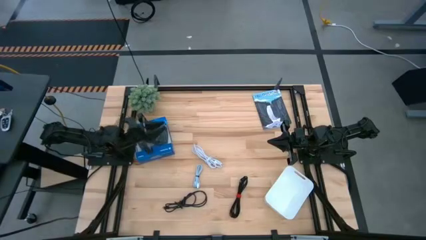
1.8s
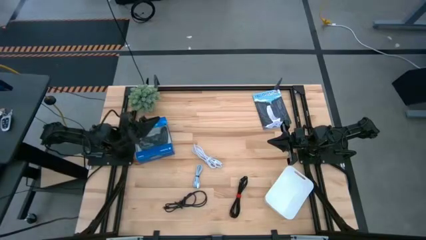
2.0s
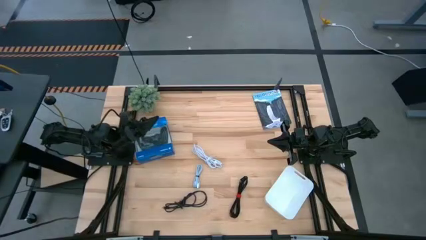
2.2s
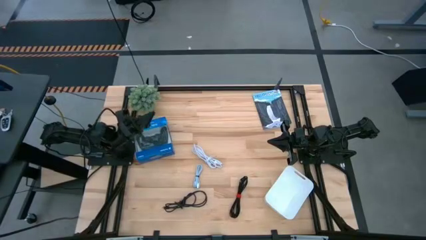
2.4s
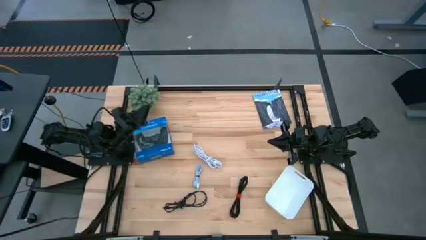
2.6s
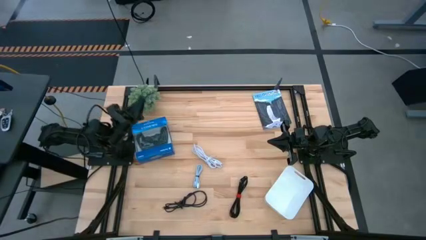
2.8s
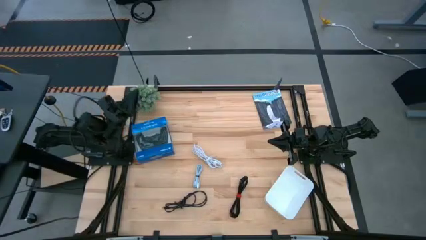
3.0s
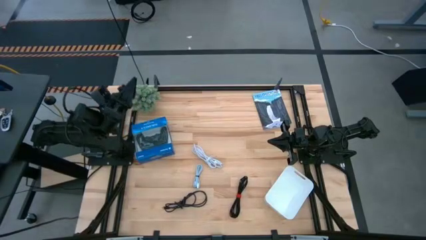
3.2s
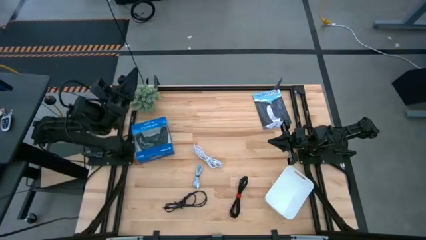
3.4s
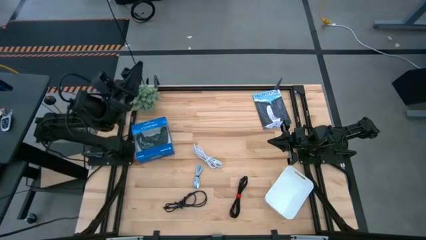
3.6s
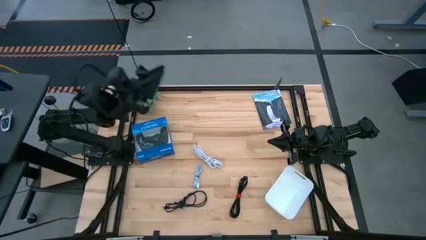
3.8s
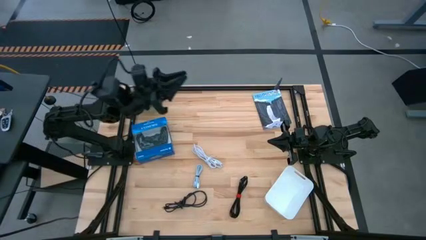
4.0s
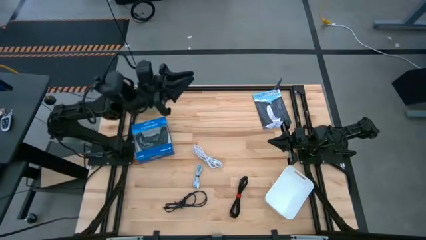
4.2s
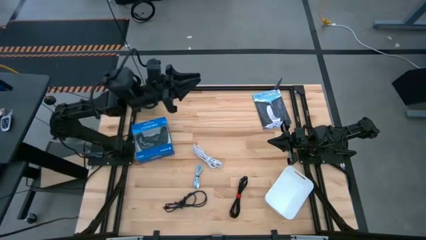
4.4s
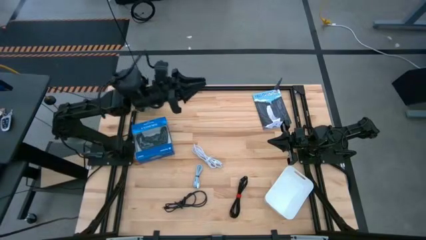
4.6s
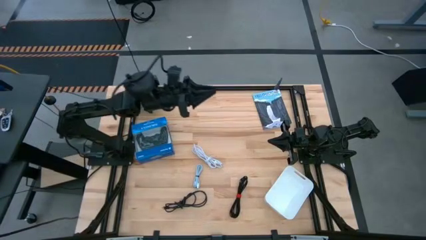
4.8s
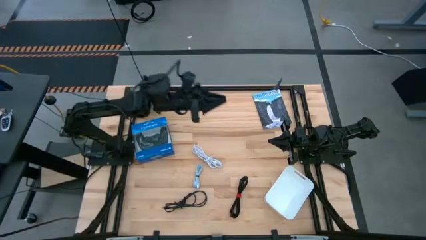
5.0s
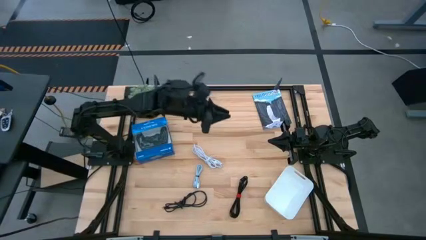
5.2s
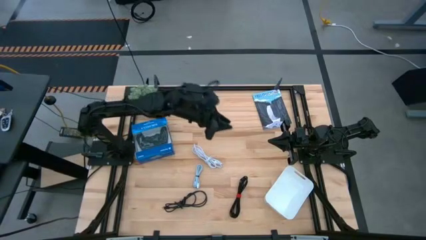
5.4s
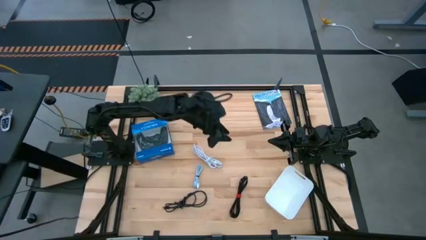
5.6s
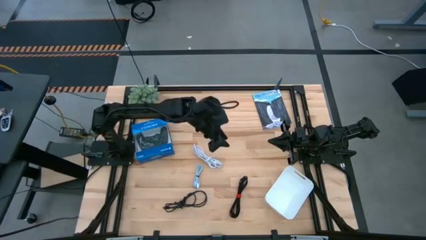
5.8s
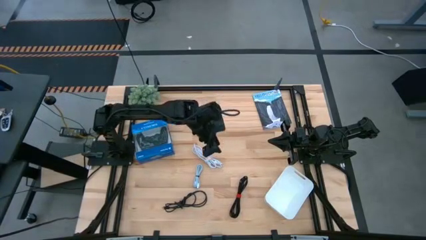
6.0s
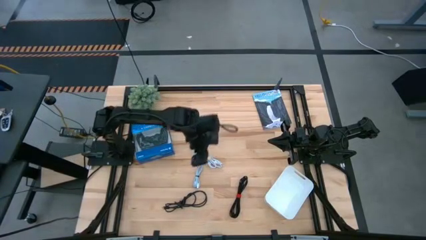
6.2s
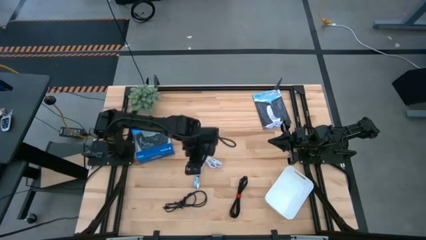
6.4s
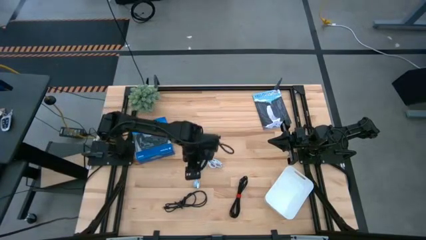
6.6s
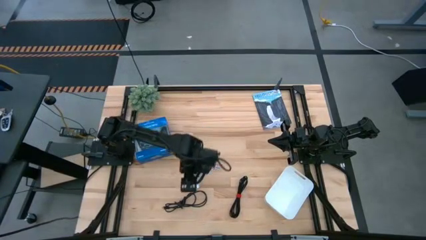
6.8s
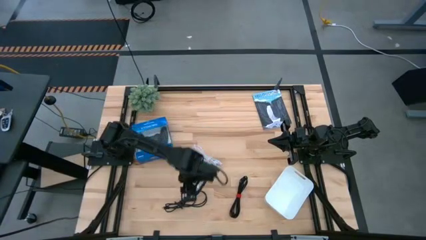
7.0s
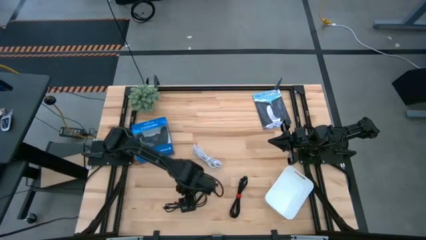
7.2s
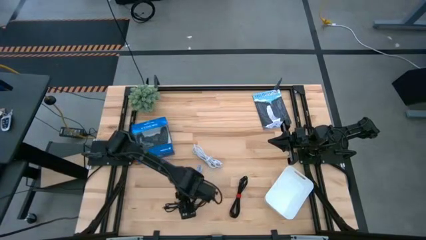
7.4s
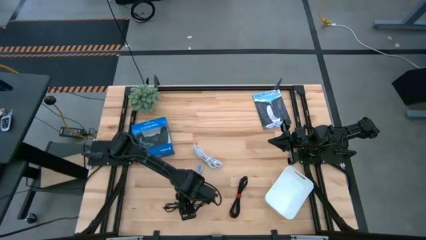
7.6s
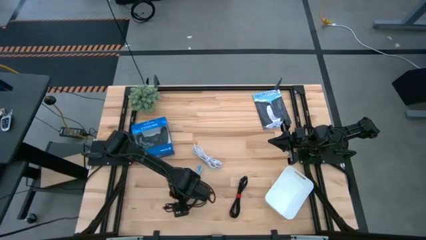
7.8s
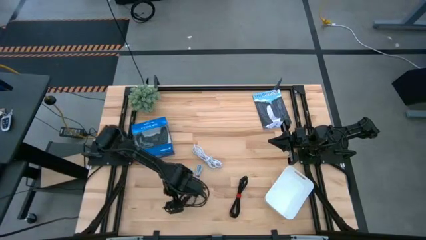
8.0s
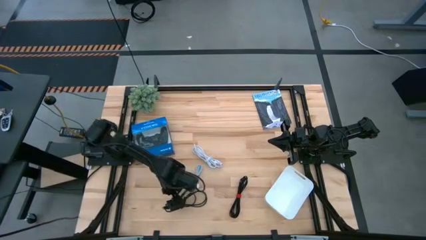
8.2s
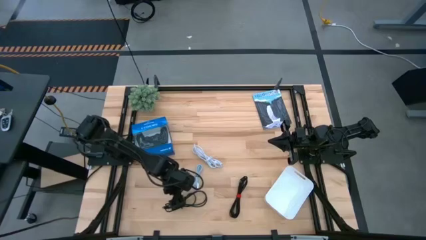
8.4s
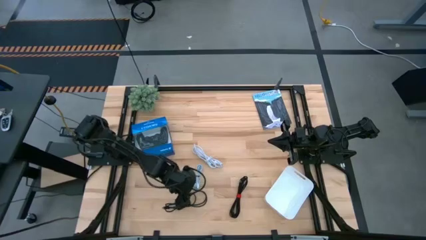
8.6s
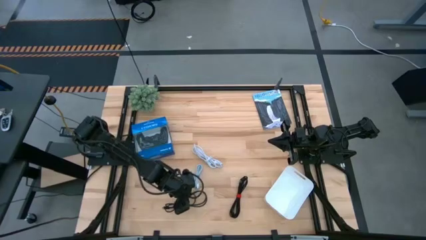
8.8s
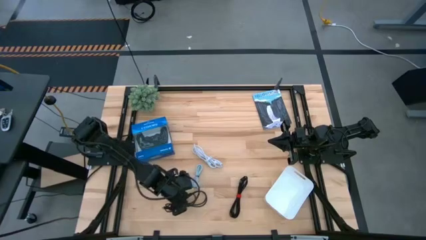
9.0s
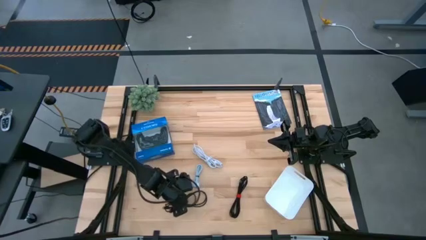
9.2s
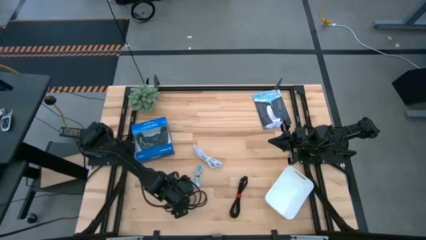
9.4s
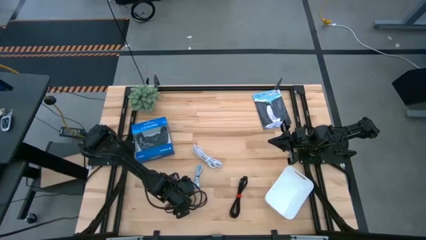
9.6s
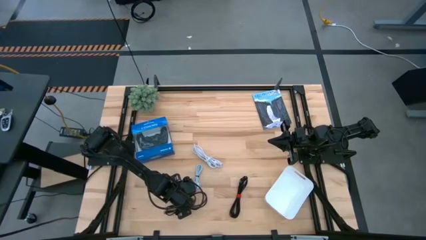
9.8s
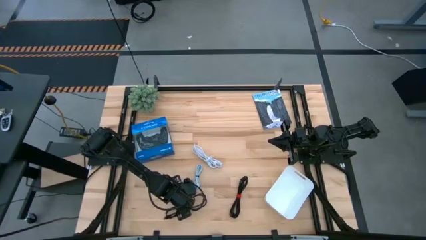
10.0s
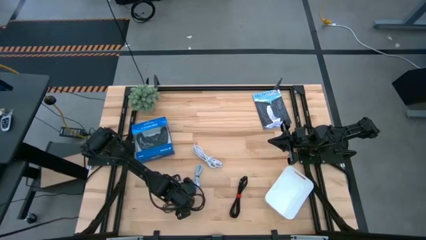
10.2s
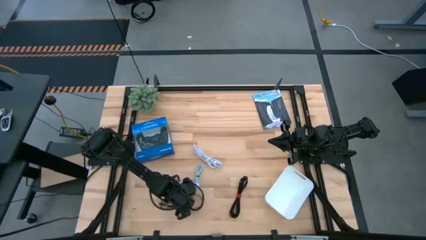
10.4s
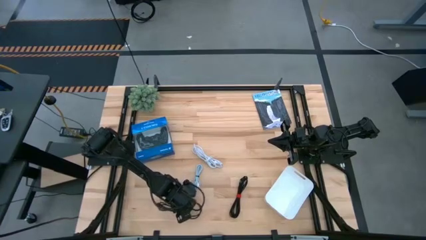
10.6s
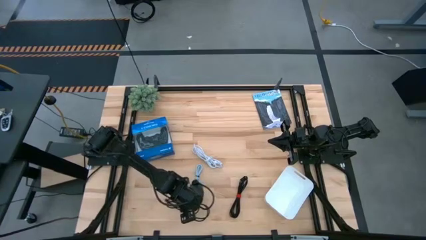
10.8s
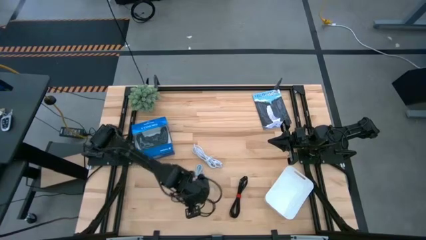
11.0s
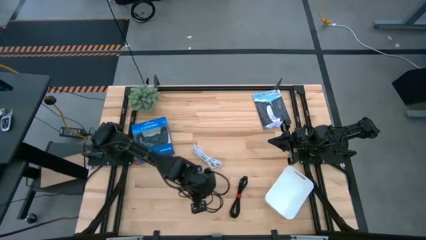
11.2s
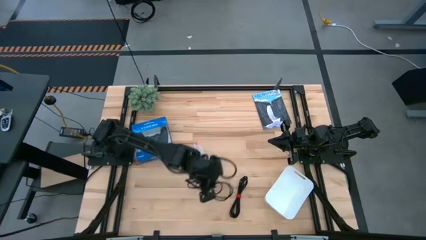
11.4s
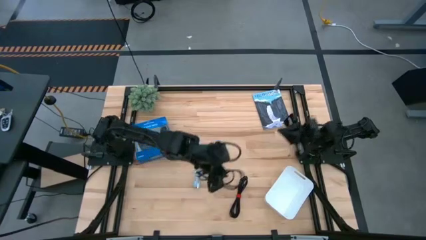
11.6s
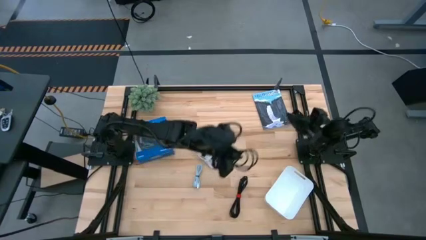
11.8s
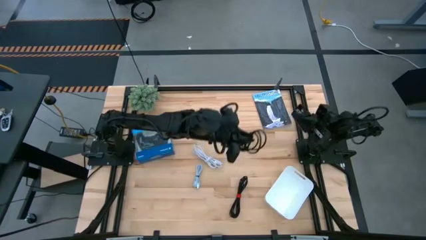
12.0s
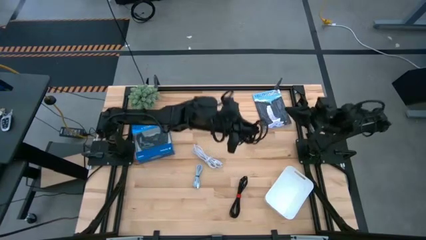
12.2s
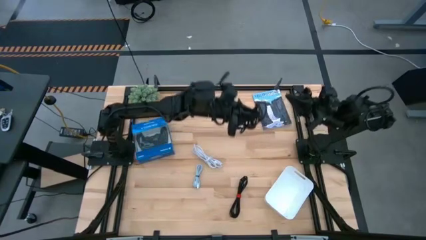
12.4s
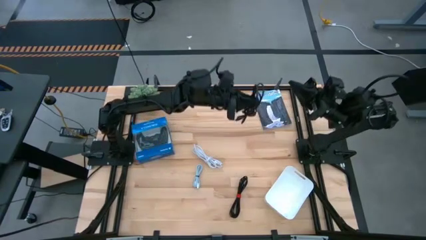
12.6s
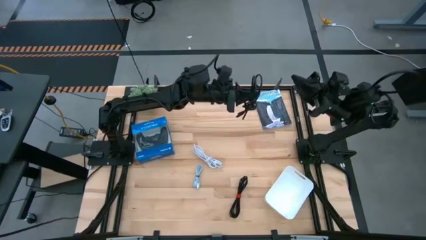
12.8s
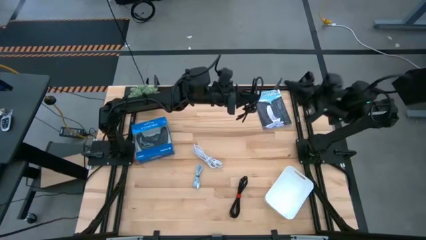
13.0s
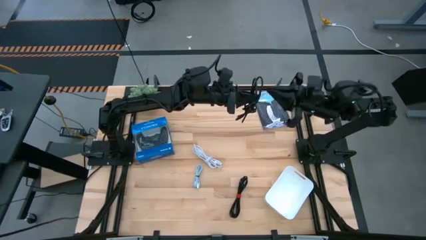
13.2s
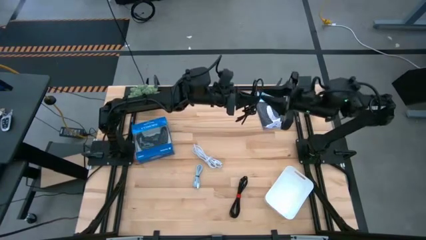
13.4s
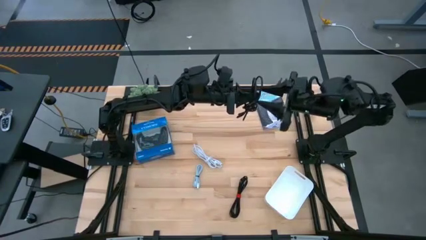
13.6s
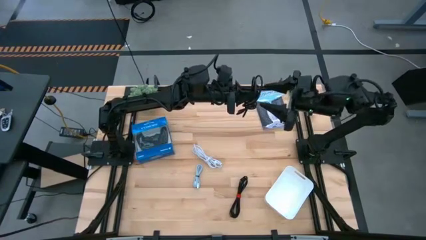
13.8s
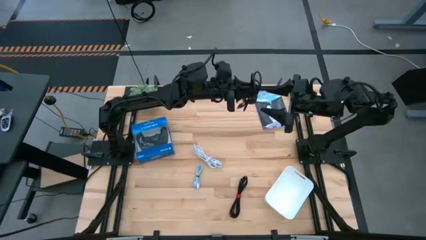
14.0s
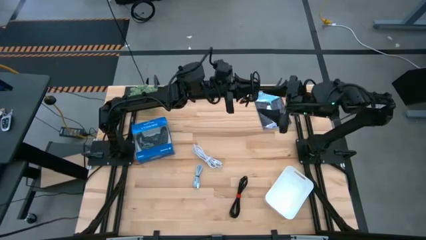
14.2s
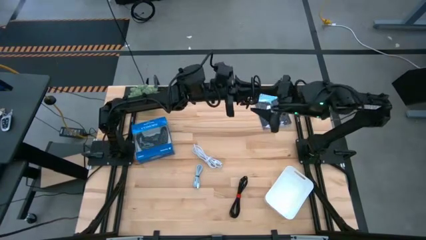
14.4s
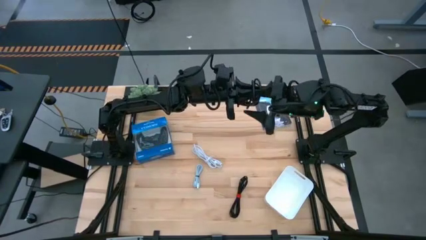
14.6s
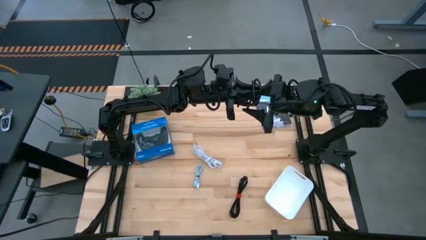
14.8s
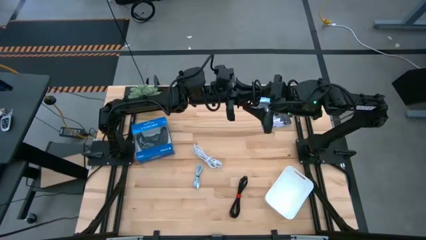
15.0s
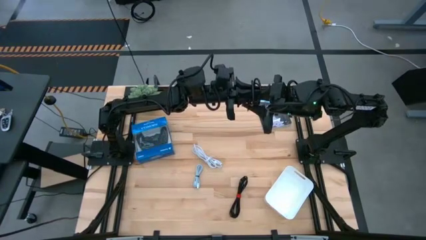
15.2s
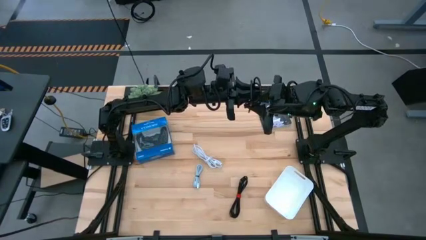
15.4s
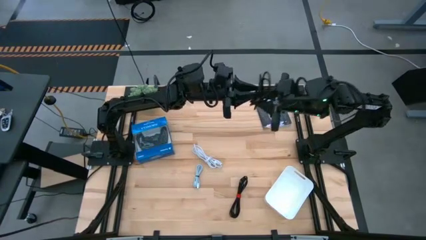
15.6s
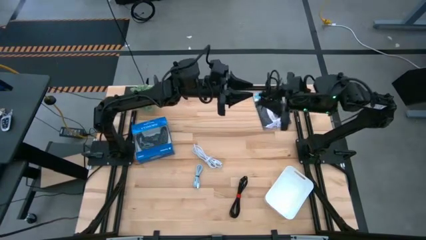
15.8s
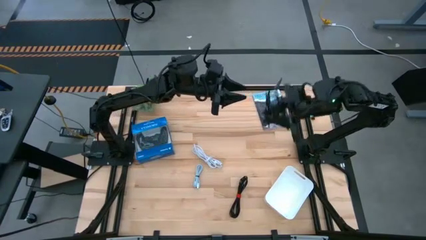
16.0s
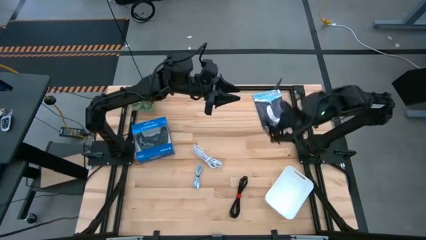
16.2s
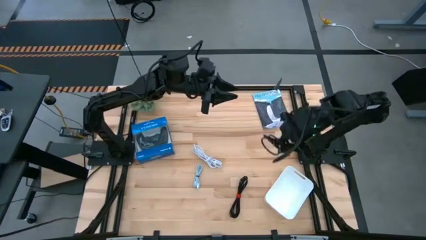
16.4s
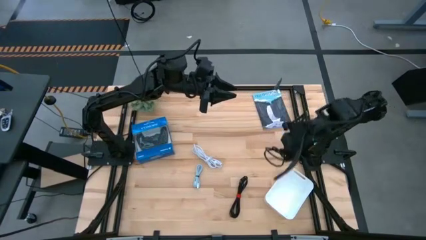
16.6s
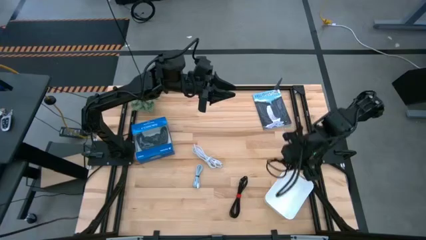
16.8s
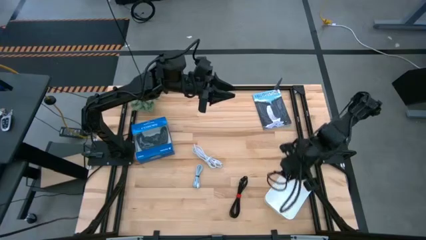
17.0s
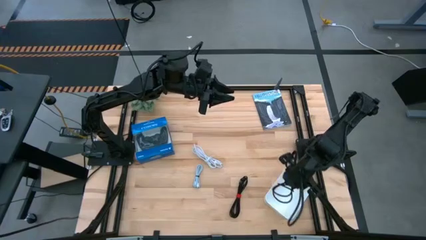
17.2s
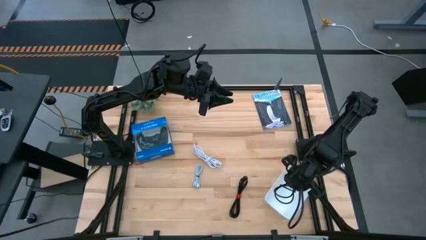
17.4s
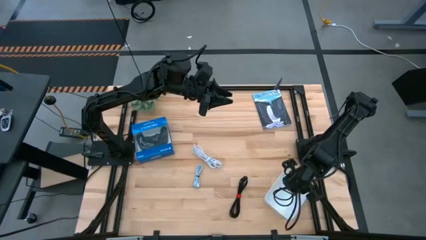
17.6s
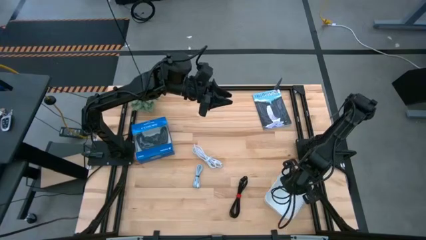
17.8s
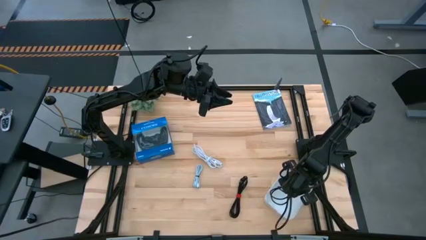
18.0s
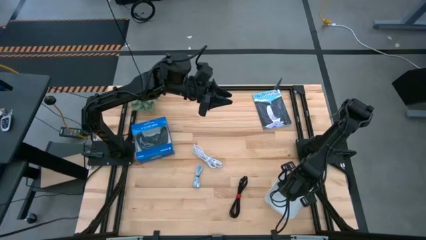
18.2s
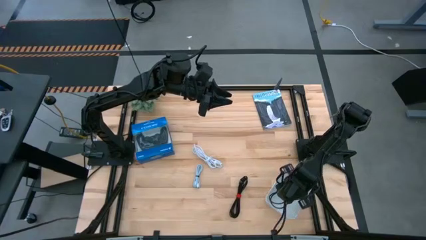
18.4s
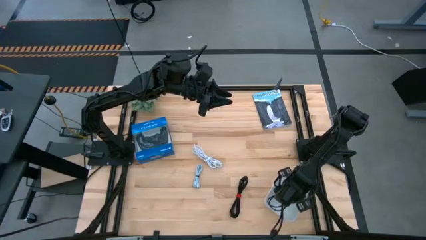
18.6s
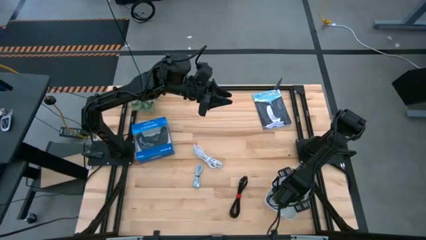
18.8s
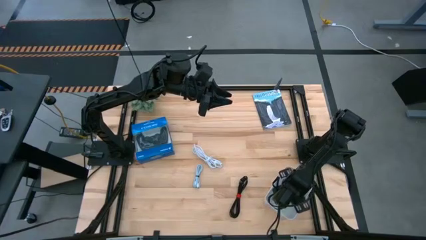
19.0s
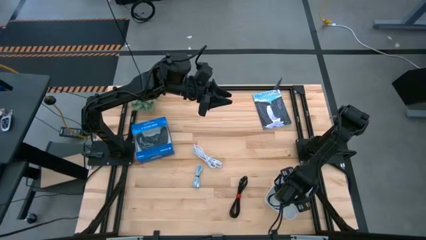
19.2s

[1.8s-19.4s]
Task: Pick and place USB-C Cables
Put the left black charger cable into the white bin
